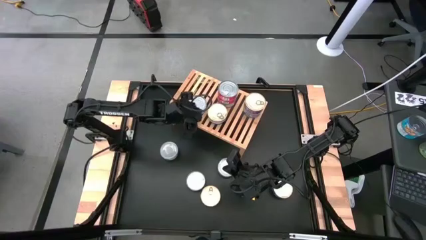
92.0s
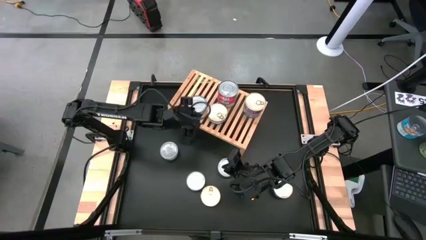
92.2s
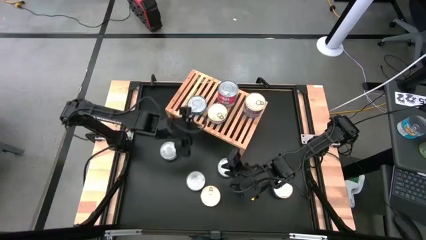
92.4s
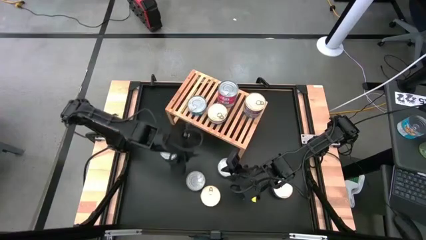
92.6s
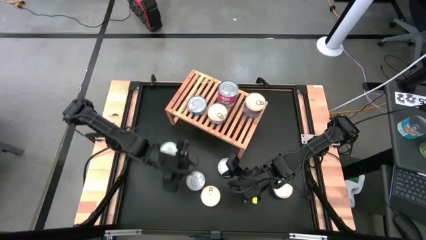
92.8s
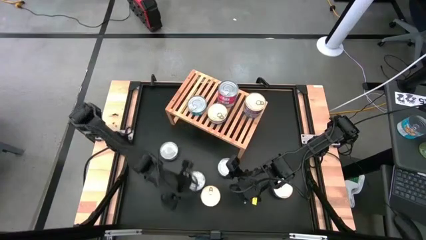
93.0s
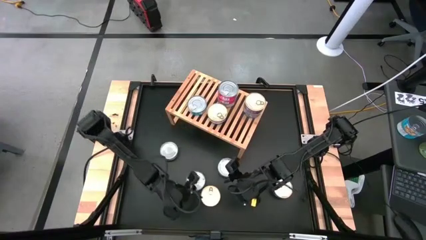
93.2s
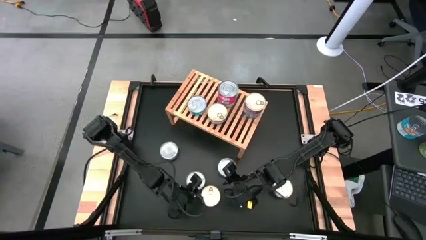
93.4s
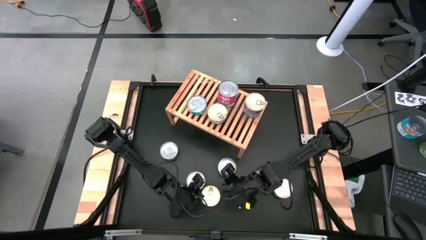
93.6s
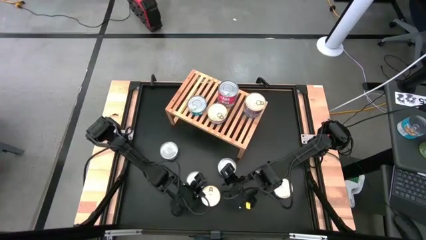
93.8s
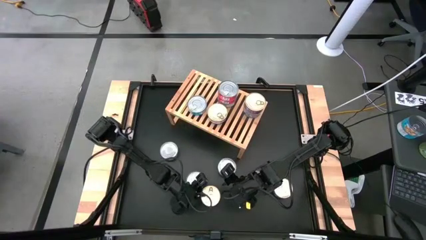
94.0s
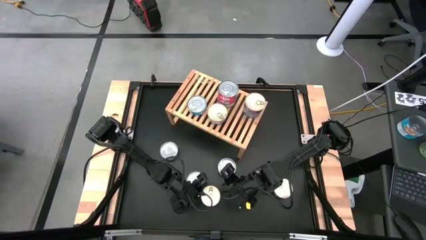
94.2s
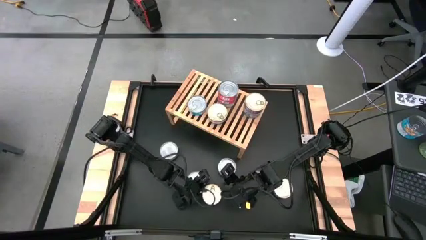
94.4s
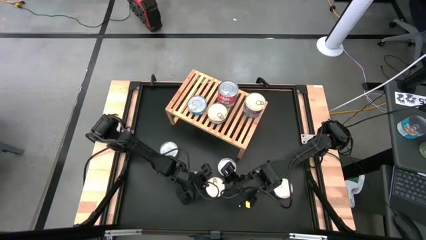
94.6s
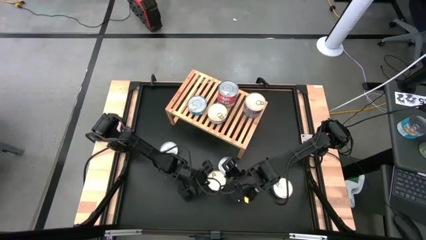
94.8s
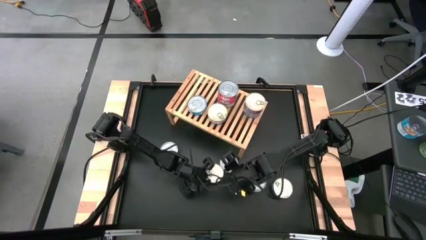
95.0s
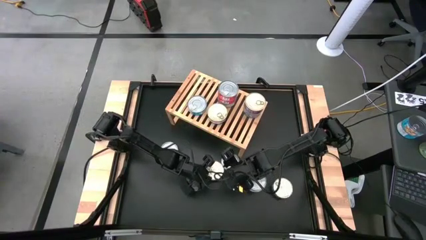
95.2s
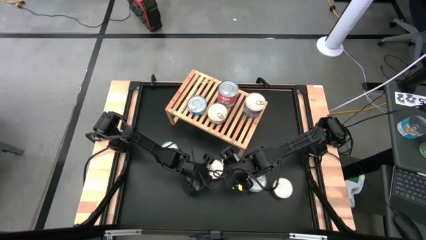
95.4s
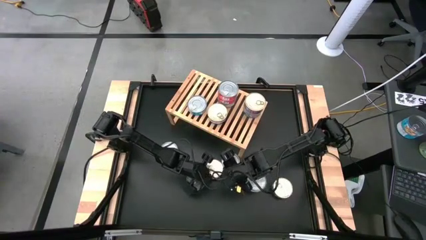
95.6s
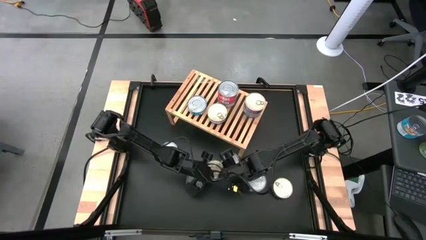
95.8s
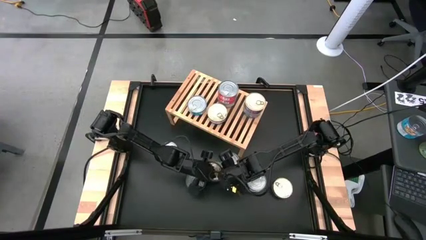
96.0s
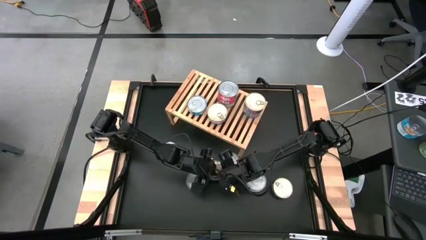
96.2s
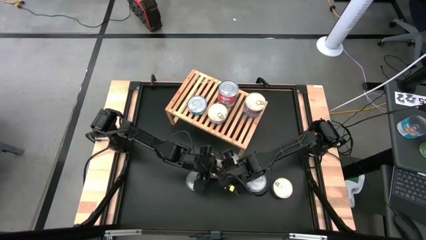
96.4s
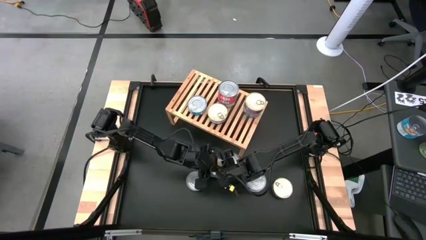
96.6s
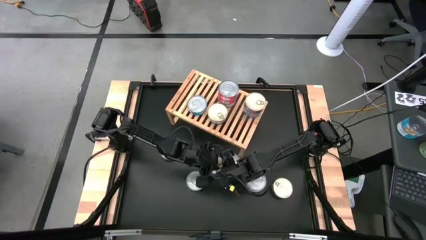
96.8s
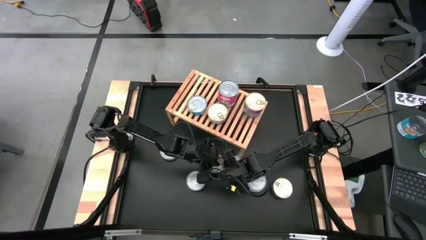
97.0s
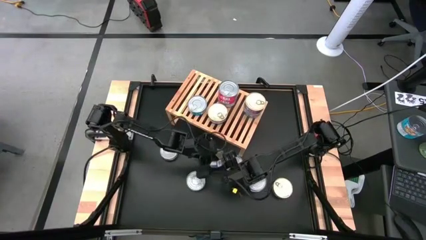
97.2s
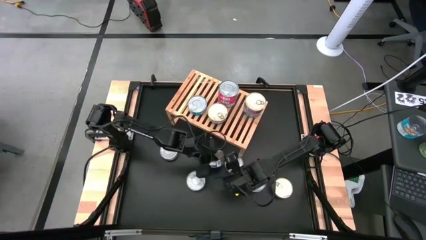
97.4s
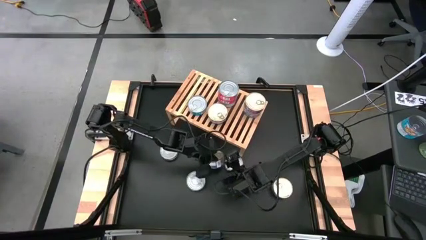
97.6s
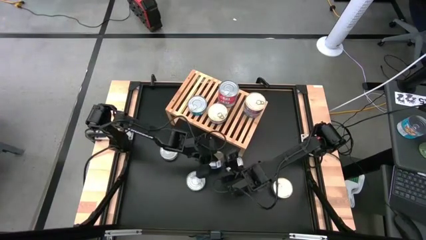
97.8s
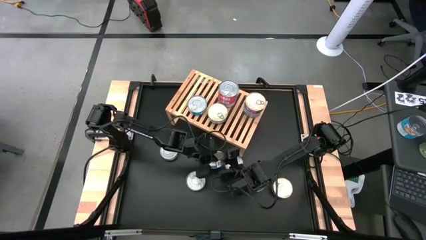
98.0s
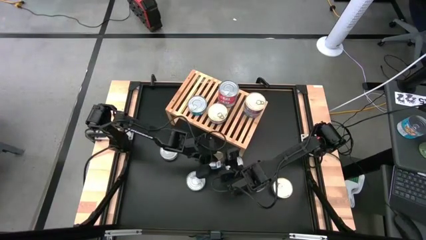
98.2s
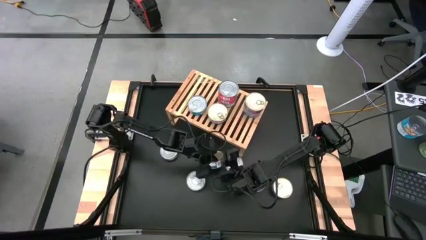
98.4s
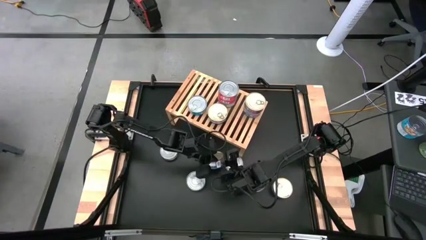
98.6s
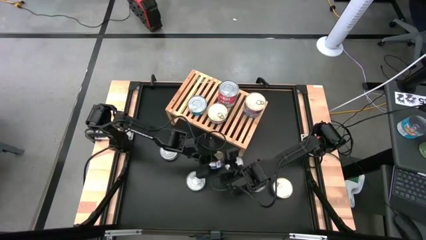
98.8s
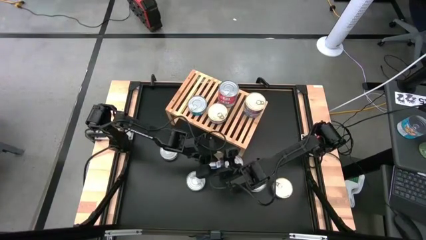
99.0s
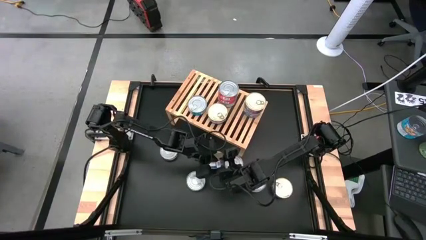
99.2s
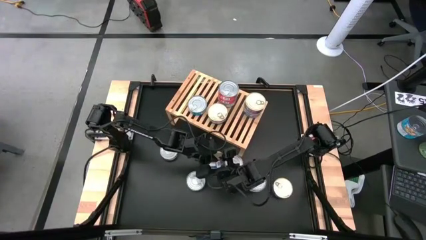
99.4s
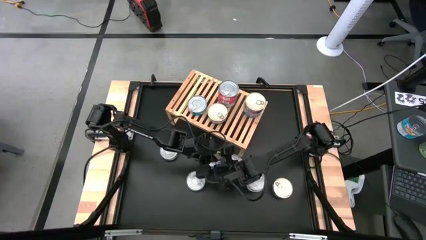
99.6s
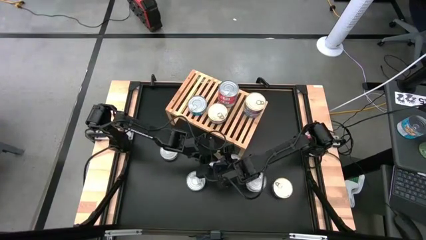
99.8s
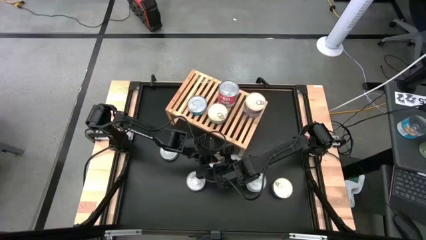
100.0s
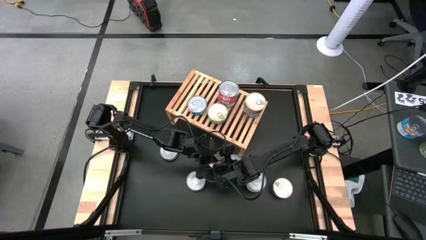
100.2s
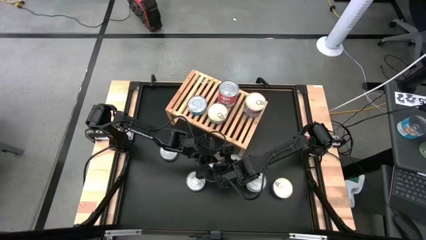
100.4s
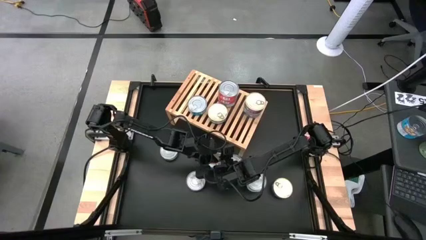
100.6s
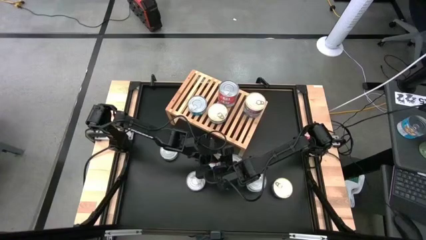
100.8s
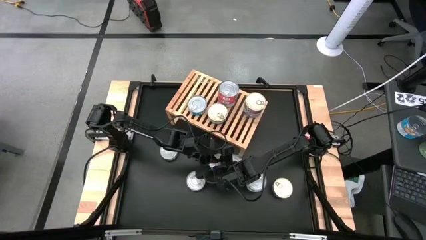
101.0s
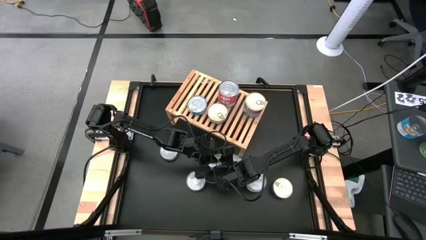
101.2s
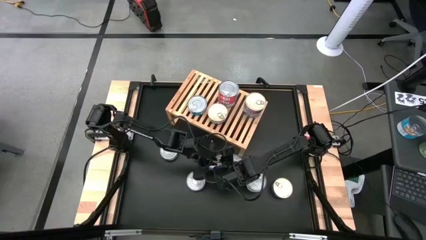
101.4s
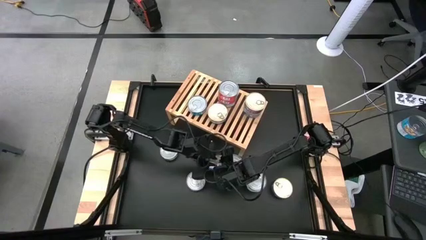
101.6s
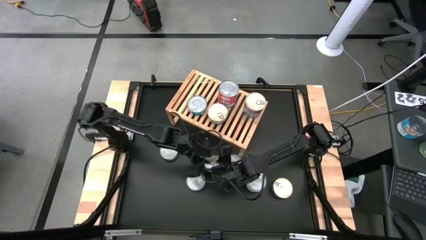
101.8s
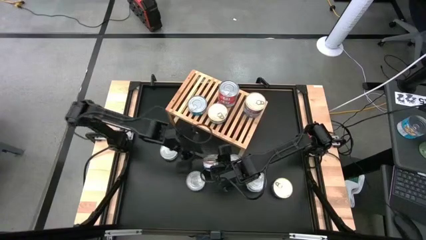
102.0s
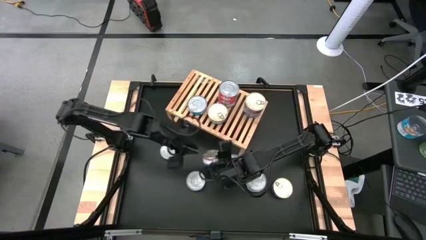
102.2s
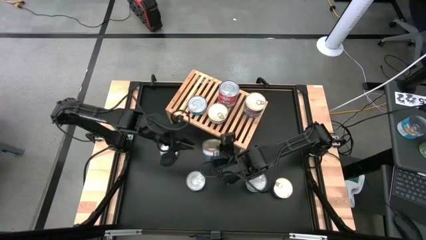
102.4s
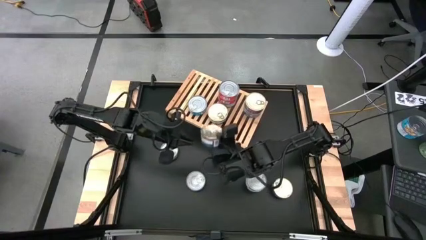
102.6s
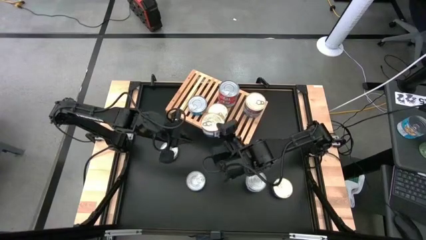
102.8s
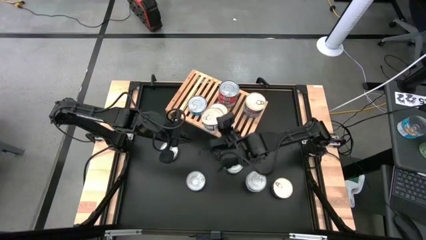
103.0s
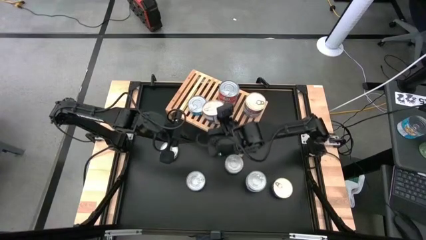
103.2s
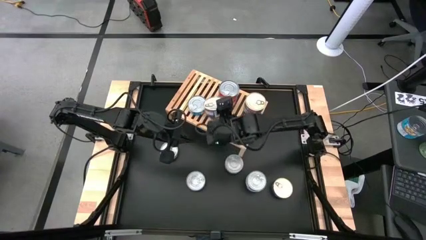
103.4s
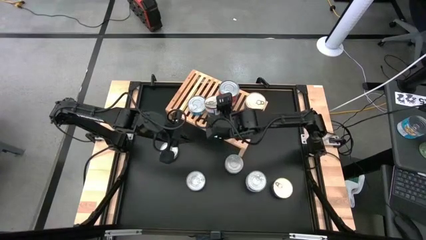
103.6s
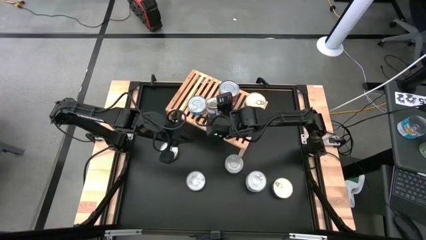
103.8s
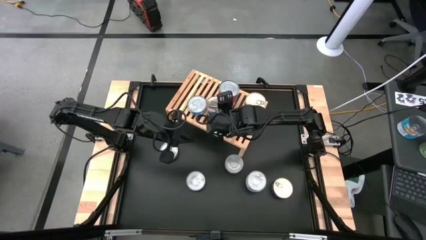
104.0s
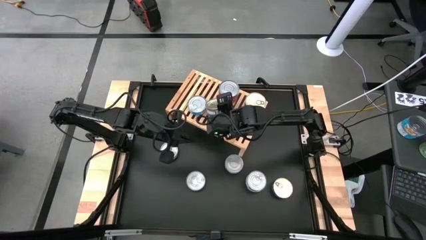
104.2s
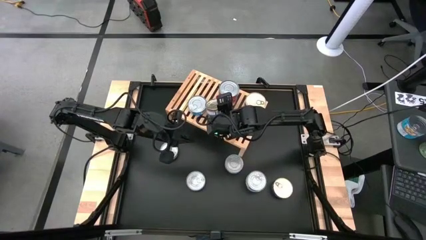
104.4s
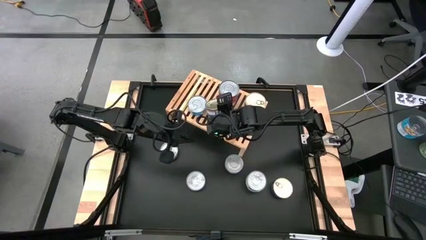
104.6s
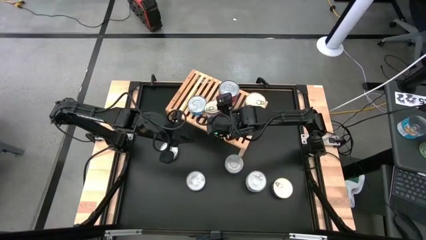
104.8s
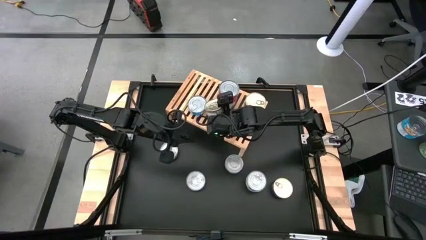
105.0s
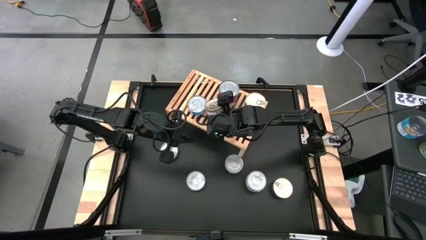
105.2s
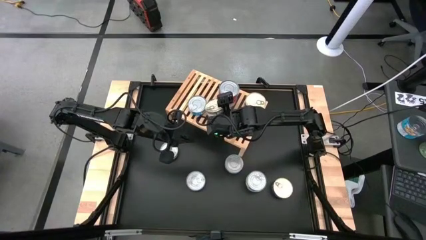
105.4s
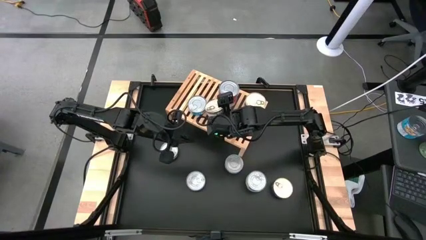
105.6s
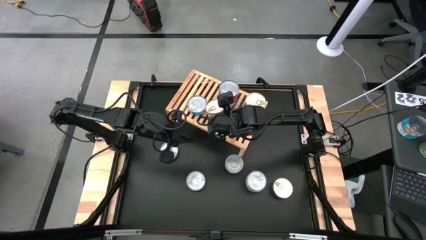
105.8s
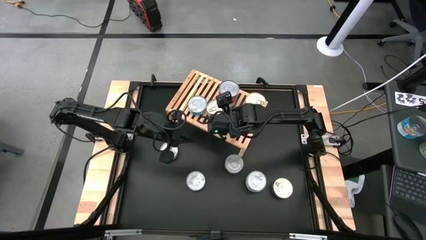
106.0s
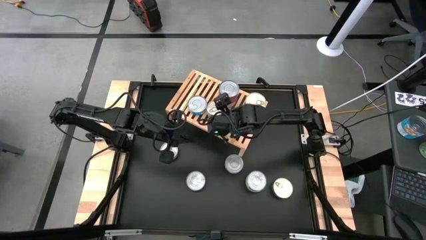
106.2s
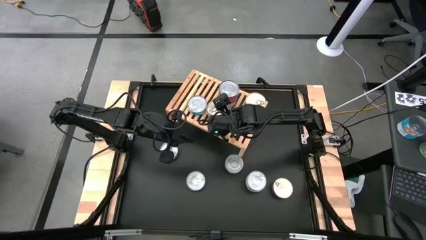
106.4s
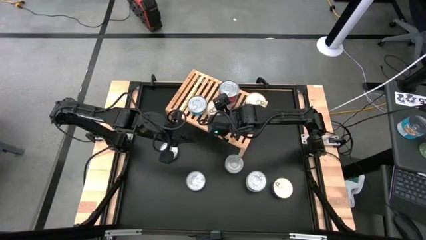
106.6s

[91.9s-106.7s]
Task: Stack canned seafood by type on shelf
Stack the blue and pink tuna can on top of the blue and pink tuna can on the shelf

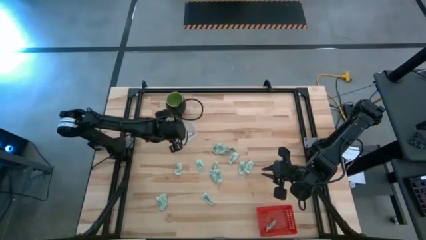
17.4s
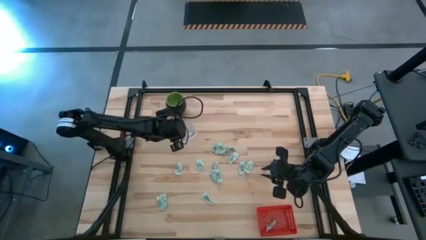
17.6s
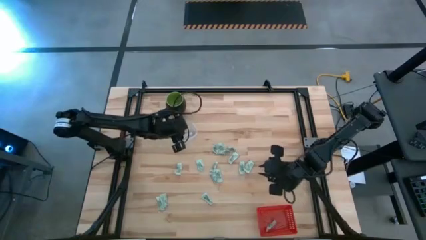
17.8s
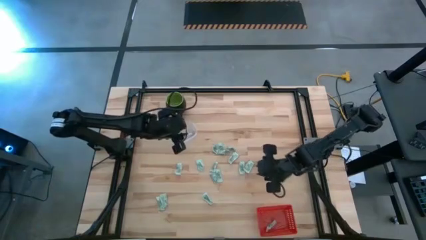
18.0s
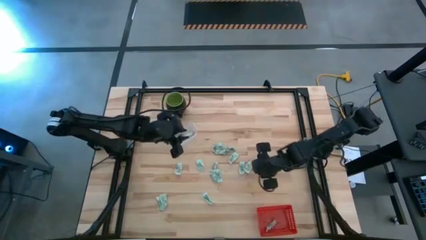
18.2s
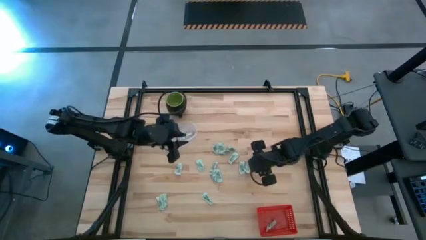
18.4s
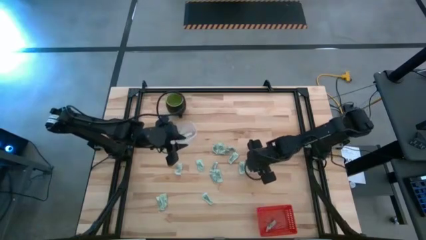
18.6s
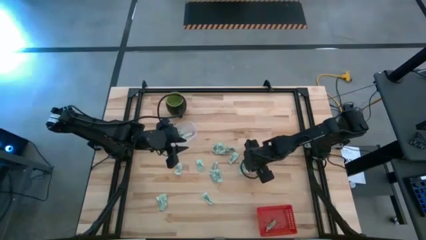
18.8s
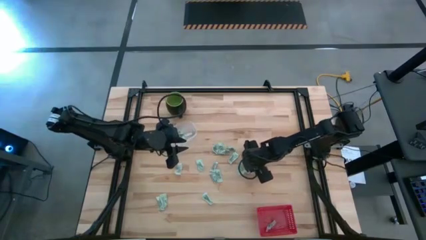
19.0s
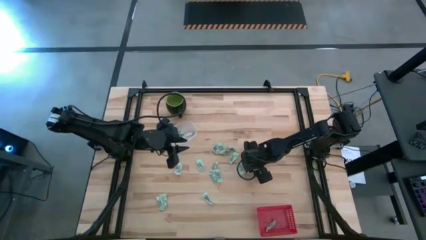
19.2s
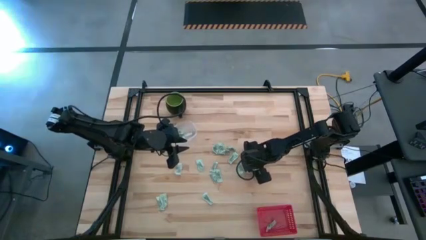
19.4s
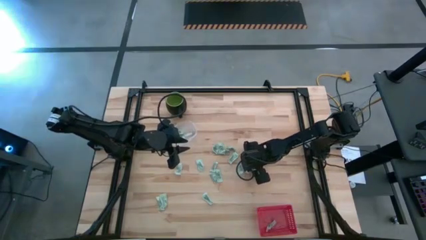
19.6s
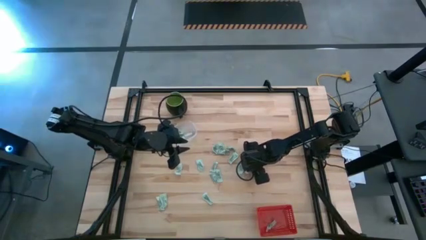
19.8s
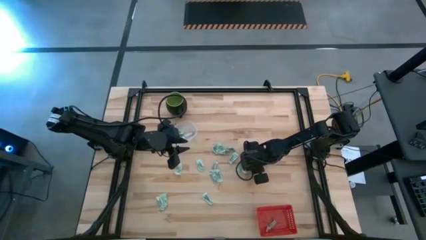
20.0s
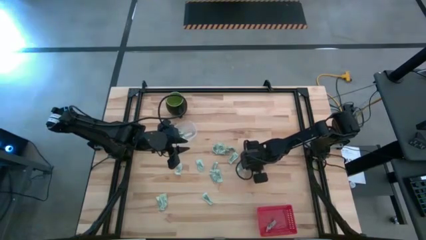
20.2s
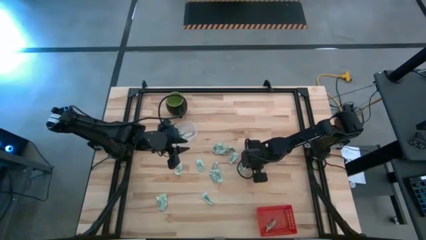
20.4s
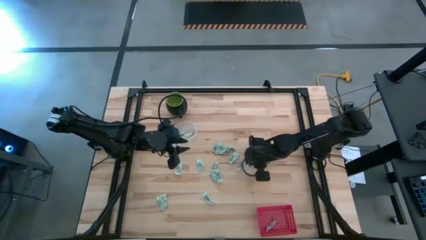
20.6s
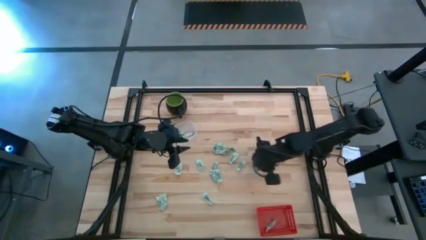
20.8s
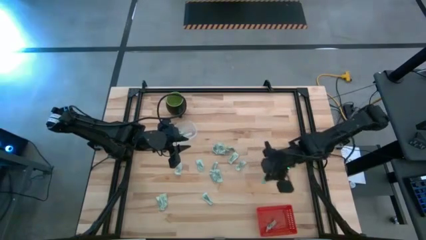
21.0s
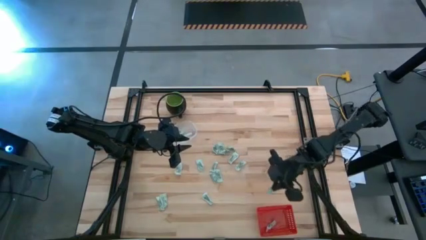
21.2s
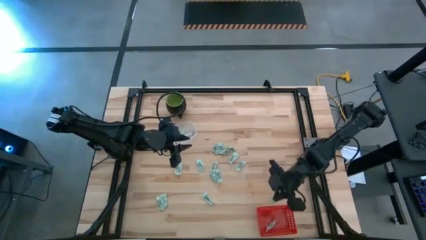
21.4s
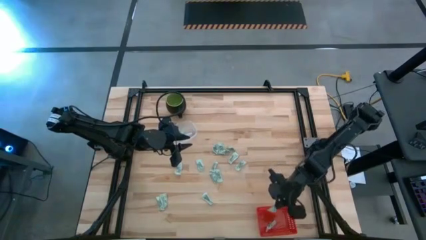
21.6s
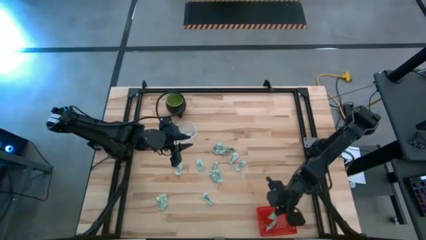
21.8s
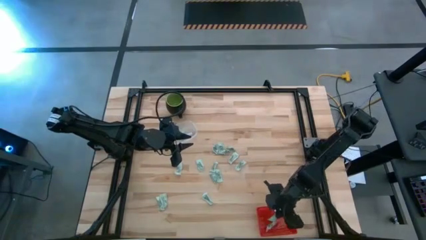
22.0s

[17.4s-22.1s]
Task: Pick and place items into bin
Put the green stevia packet into the red basket
